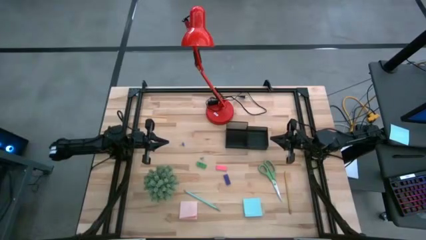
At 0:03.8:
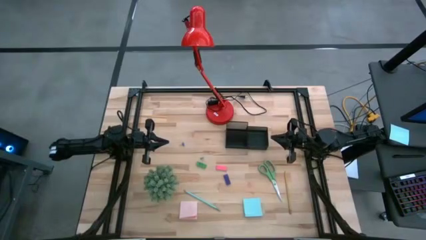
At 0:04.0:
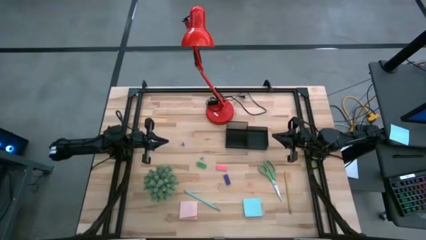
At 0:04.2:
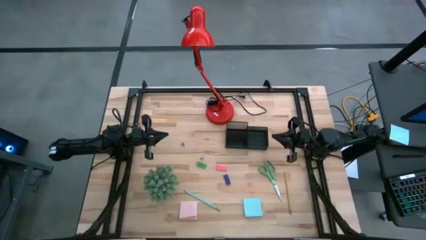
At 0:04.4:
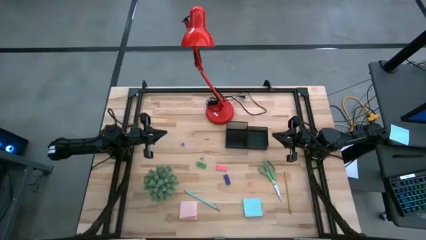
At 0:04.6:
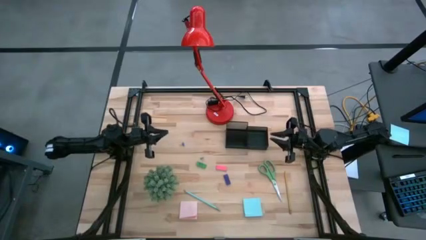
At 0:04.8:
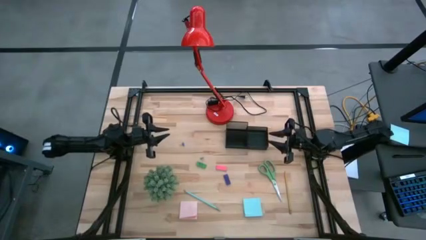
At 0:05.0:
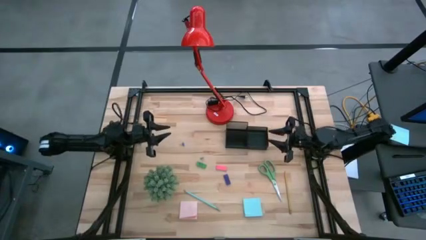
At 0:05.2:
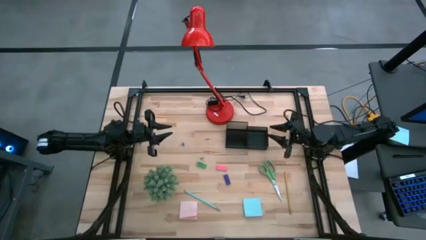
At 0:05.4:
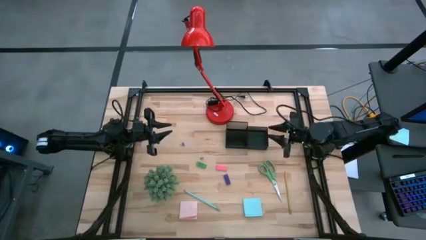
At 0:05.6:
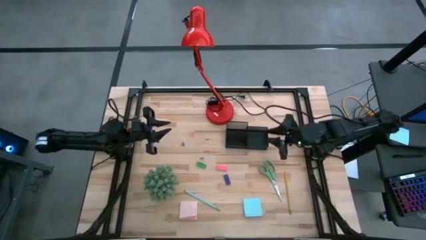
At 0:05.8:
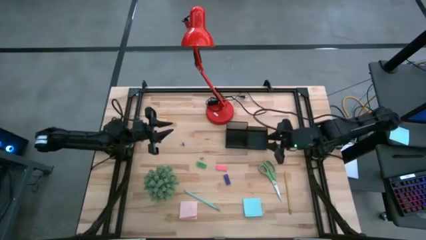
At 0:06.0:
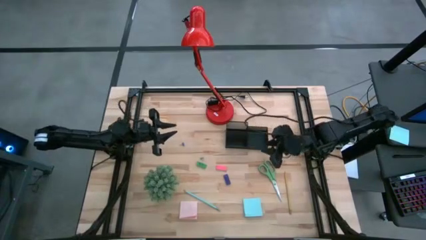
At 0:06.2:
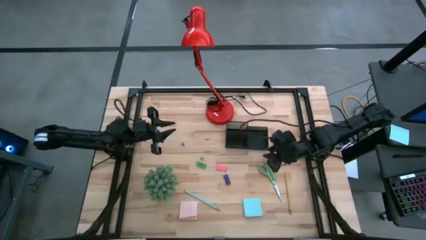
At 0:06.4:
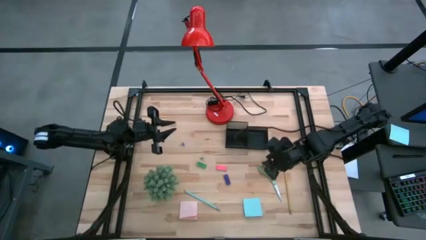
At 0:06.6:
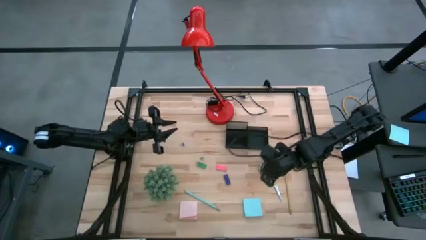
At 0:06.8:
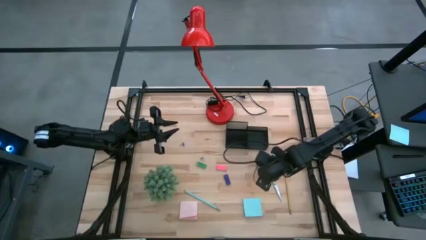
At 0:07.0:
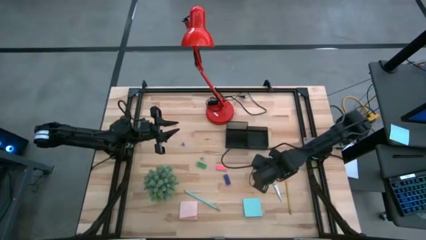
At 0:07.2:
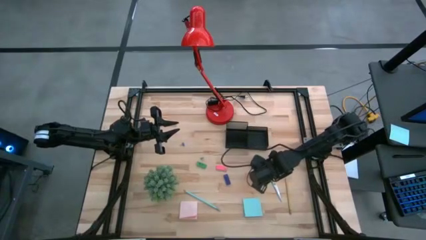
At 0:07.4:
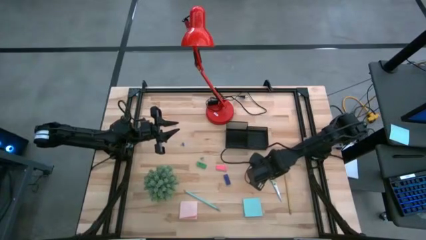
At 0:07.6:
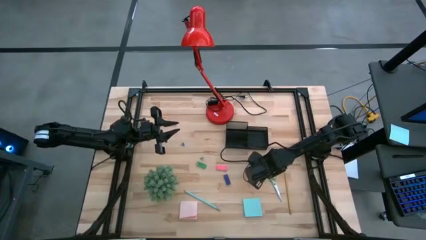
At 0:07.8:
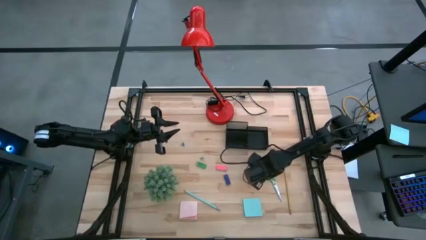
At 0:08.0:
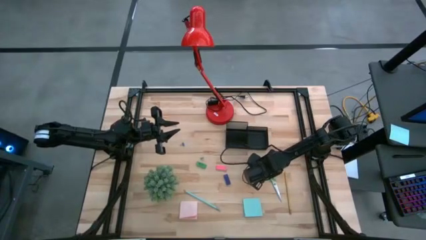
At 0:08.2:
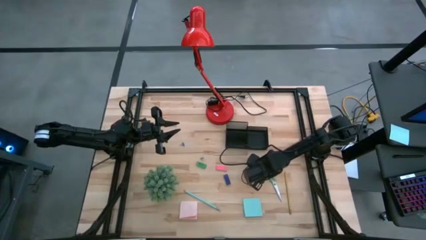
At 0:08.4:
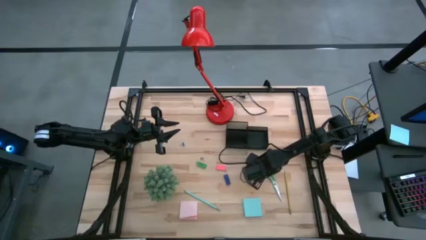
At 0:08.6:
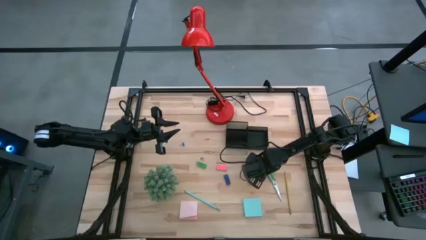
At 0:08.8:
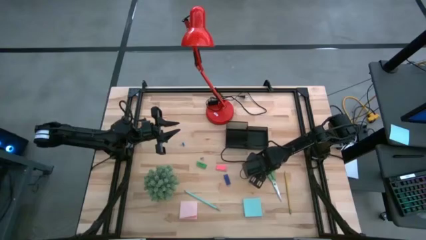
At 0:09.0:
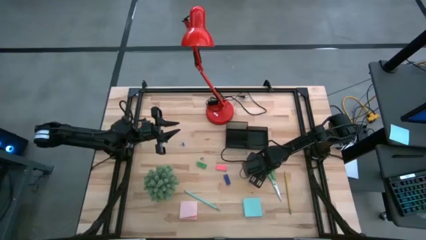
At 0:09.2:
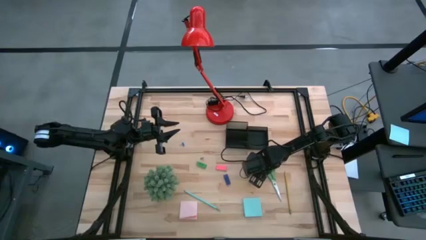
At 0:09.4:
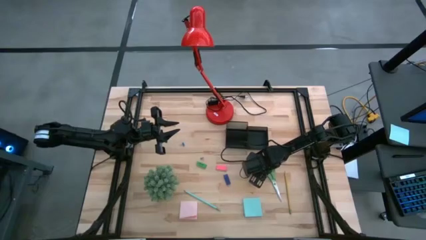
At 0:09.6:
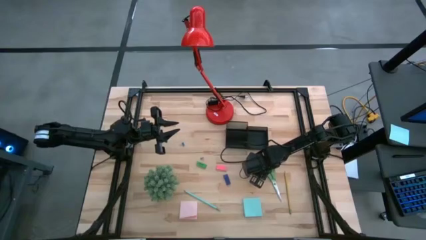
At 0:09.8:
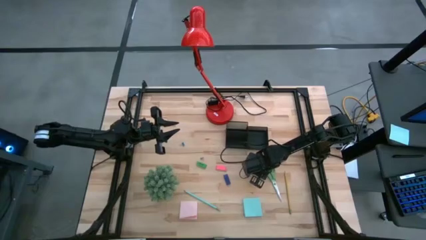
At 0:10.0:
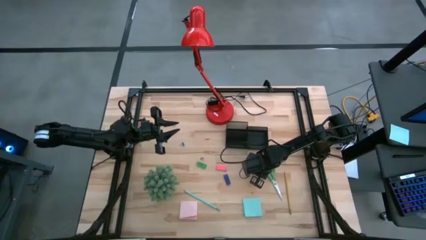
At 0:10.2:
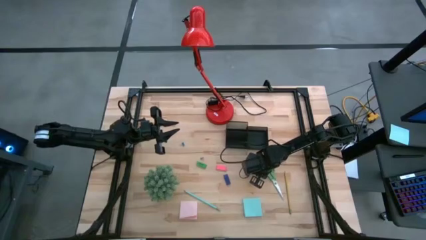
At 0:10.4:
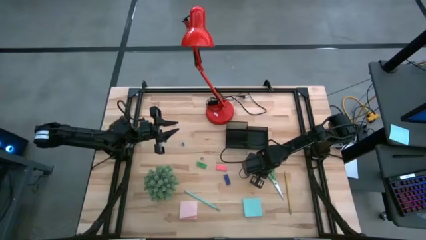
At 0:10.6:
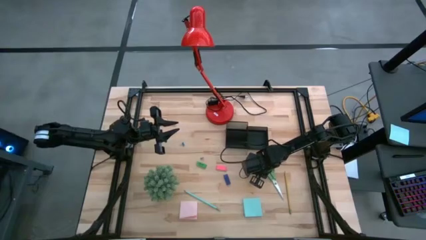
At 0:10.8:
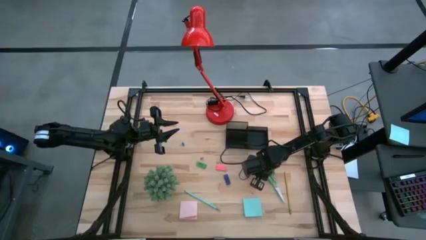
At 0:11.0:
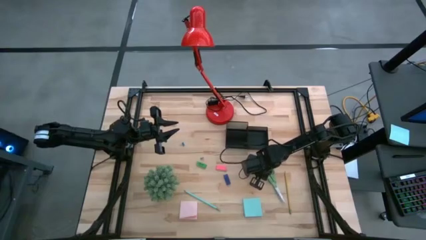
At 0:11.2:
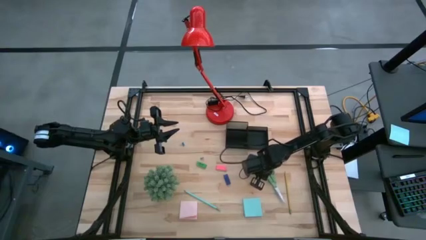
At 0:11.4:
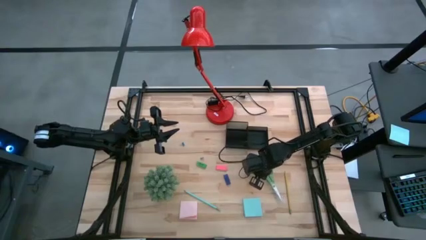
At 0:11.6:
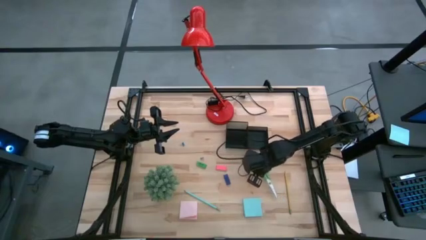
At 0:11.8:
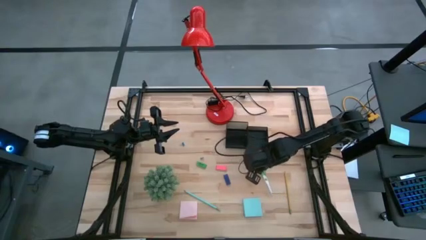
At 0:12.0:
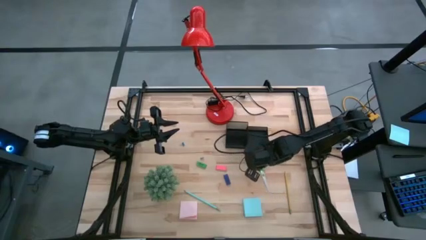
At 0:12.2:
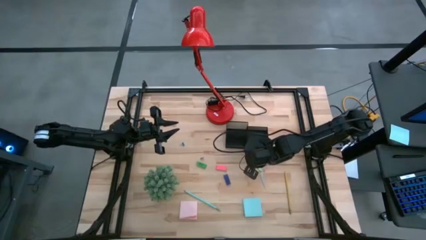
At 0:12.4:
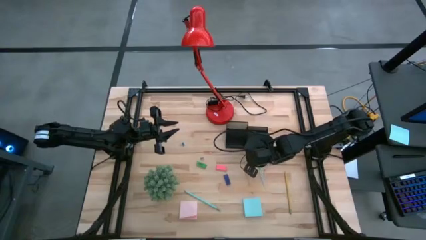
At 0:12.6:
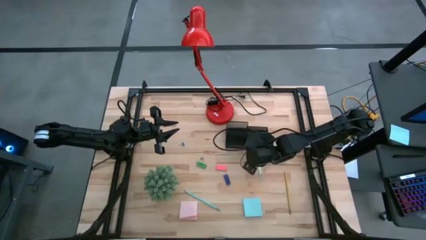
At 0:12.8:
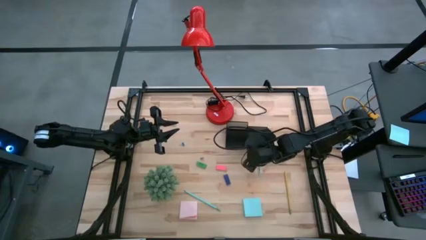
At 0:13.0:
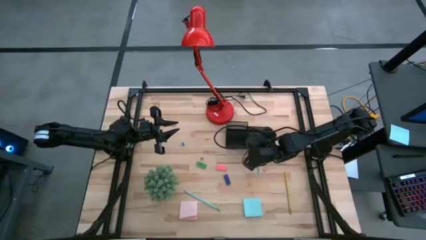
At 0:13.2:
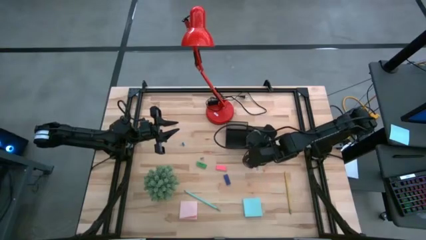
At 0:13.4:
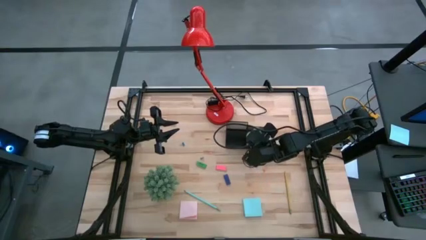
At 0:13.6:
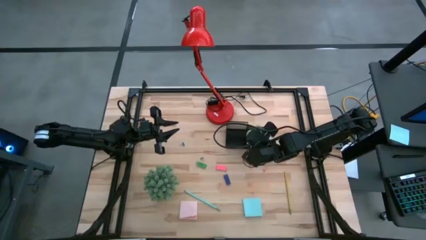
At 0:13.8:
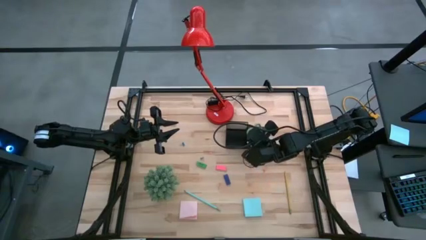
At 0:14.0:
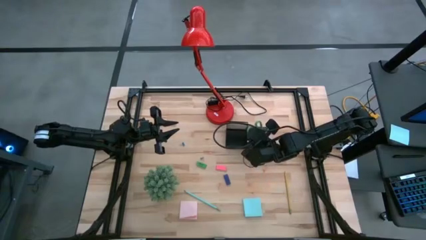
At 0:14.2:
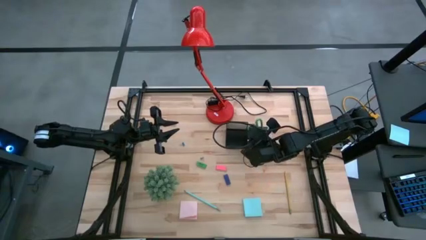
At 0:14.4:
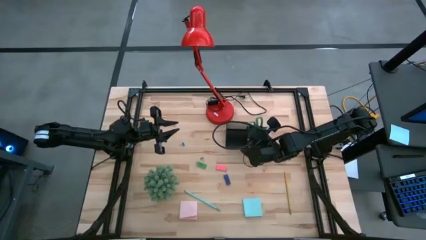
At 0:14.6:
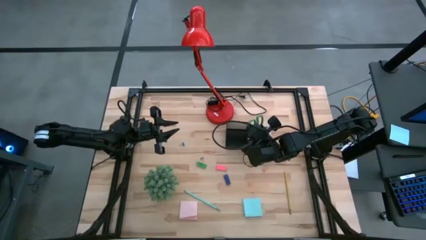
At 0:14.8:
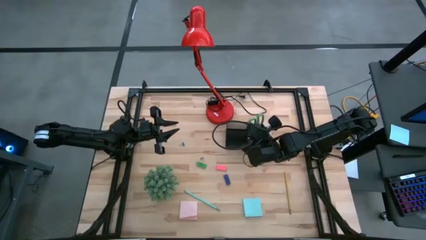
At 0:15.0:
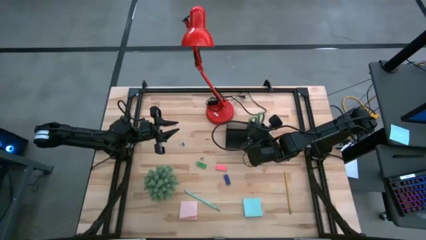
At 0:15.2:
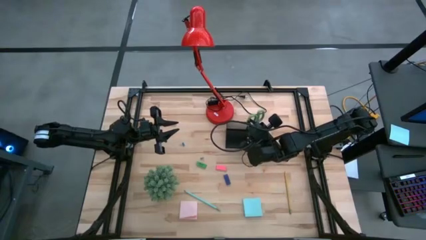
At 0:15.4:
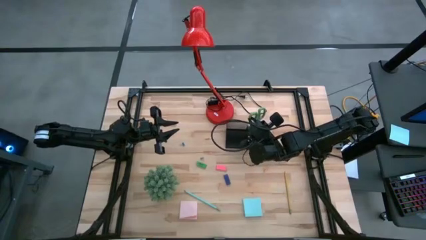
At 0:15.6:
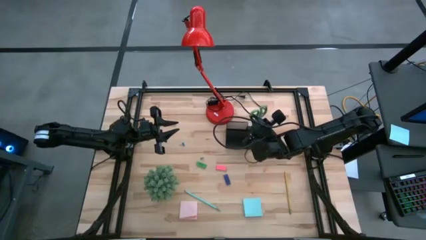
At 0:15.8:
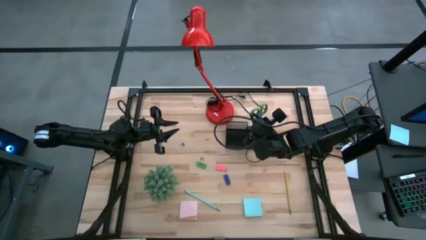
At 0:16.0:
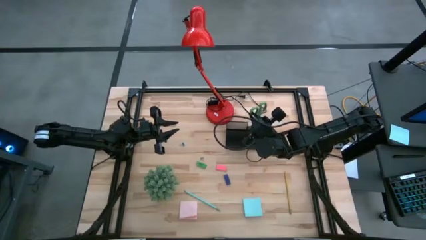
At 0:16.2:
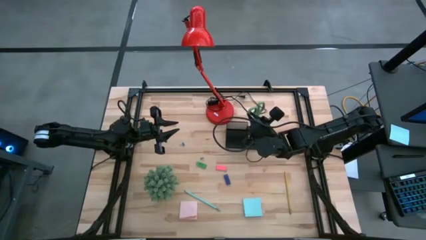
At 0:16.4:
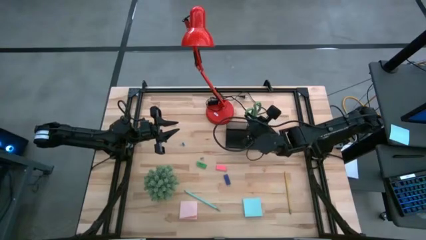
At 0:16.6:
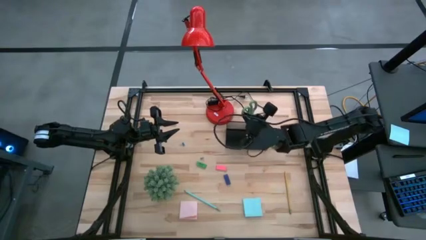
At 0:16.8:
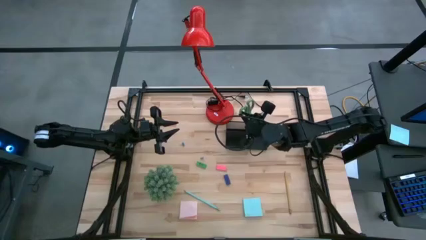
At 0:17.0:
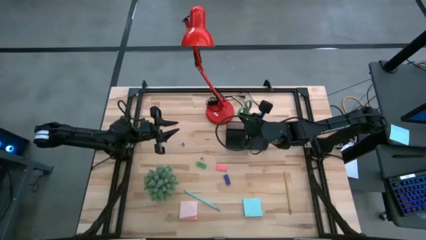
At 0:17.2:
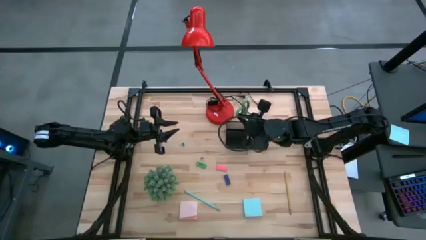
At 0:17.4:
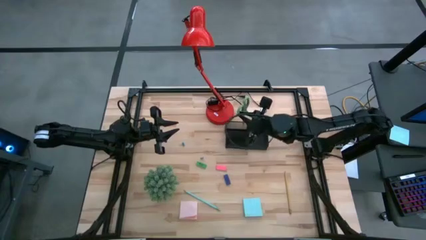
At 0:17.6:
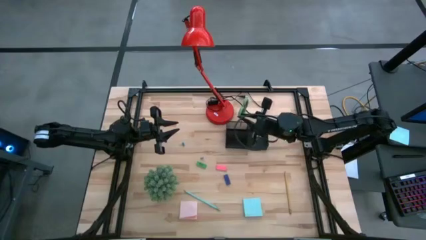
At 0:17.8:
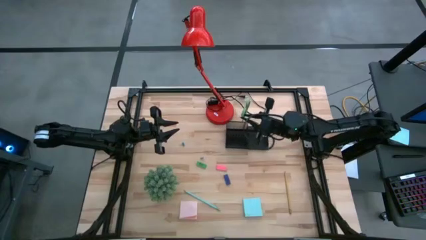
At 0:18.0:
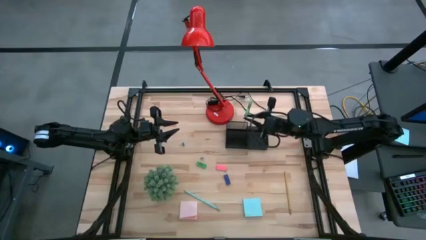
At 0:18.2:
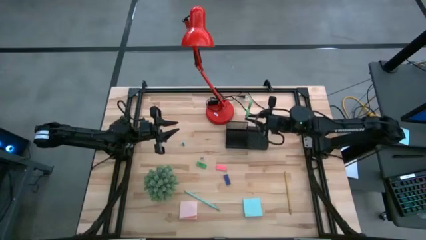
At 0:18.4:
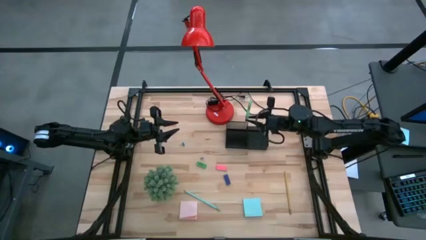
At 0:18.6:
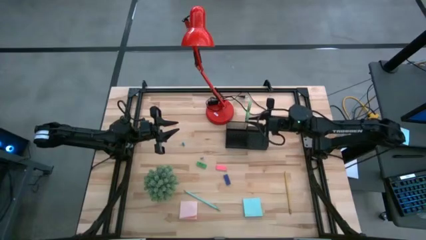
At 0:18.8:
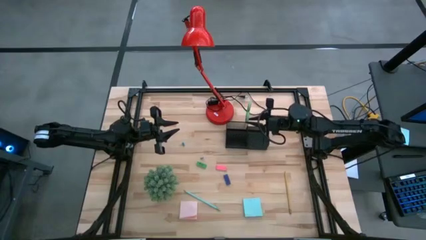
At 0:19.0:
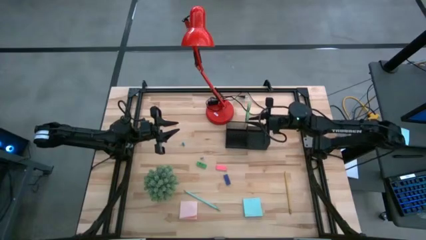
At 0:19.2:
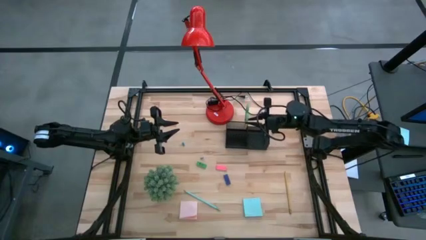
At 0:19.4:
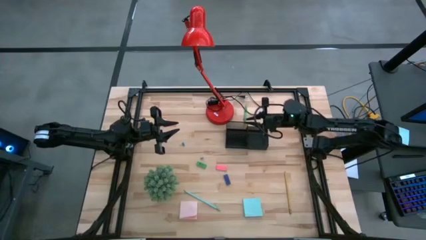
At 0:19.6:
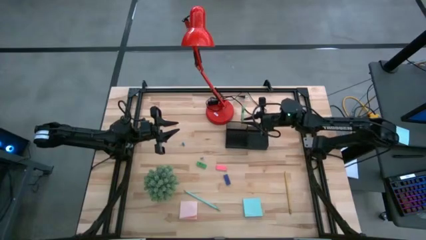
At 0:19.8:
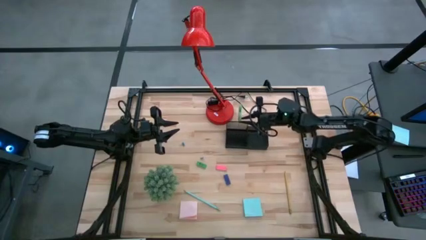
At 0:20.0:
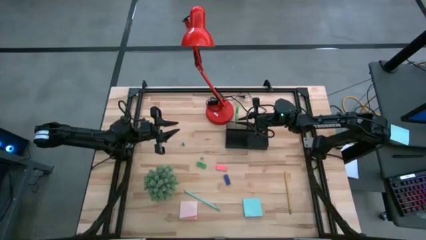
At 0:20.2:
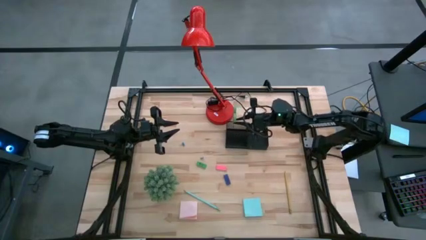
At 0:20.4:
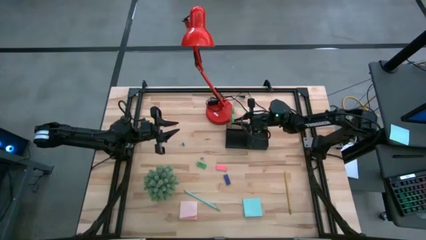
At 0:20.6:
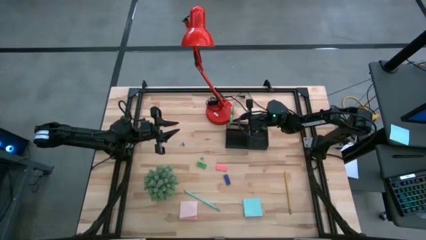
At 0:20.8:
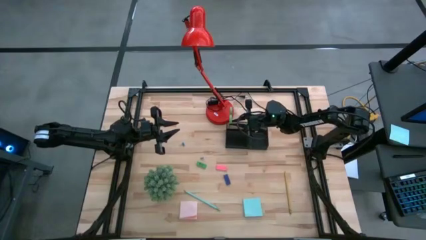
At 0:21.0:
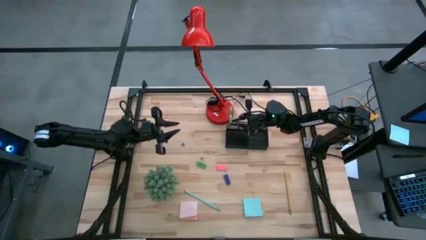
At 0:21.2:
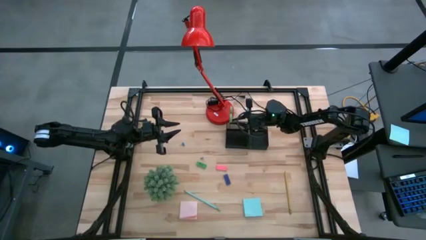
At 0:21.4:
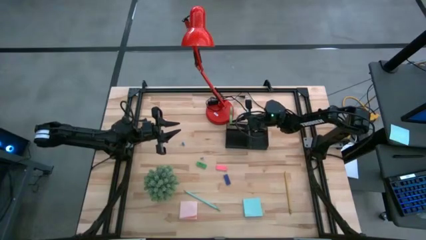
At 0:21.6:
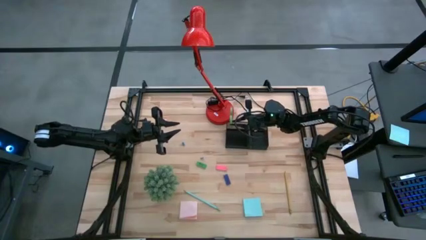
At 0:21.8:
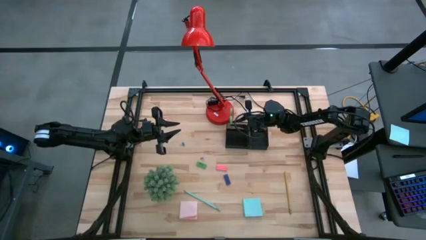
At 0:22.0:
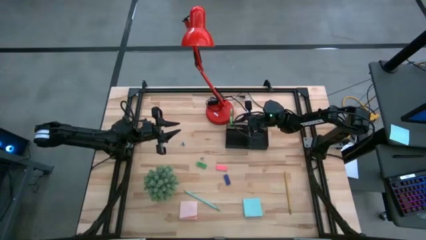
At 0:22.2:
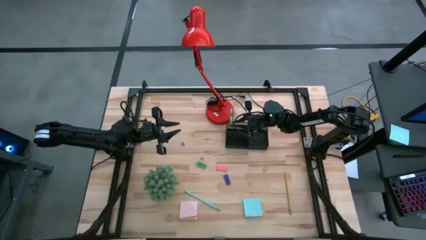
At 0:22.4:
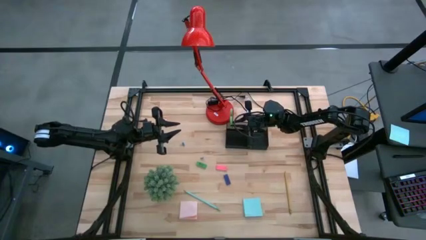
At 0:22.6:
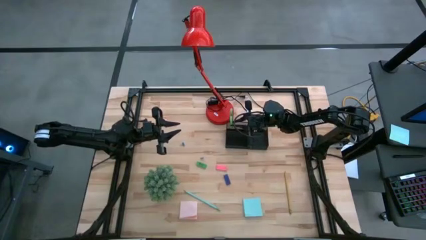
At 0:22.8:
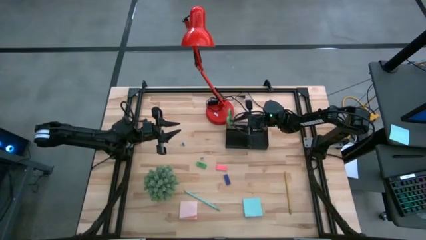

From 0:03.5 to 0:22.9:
Task: Pick and place office supplies into organizer
Put the scissors into the left compartment of the desk organizer
